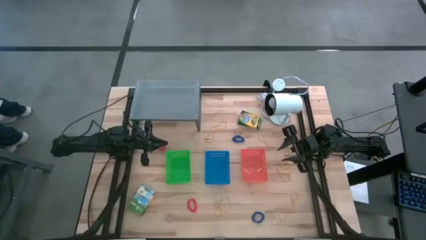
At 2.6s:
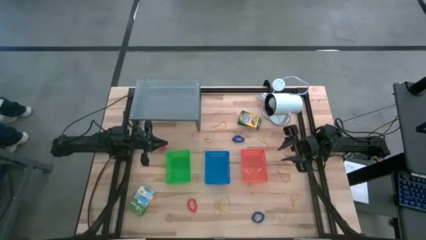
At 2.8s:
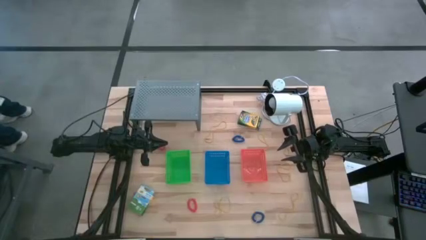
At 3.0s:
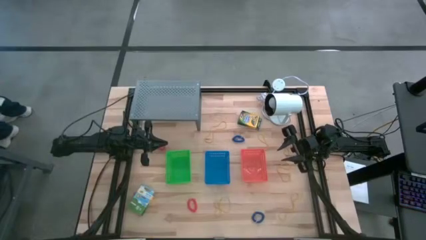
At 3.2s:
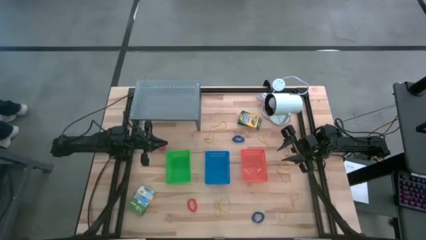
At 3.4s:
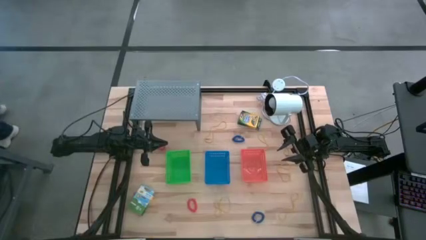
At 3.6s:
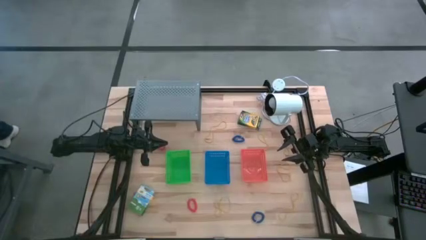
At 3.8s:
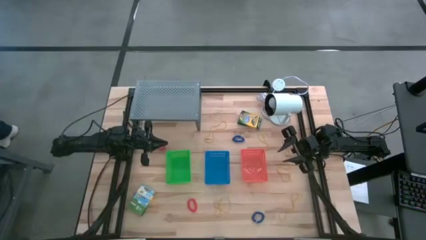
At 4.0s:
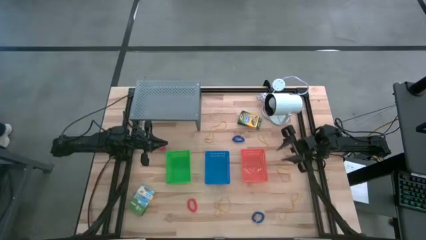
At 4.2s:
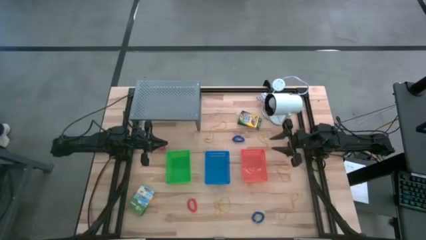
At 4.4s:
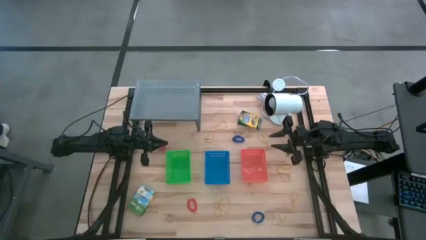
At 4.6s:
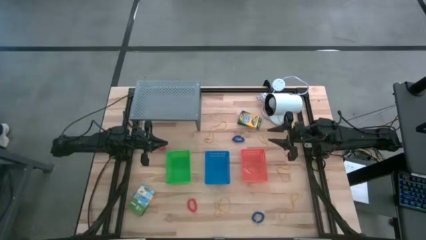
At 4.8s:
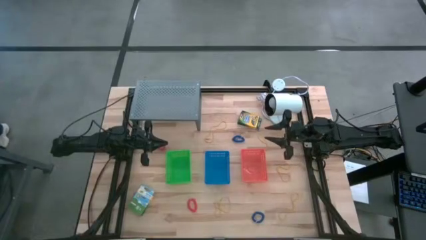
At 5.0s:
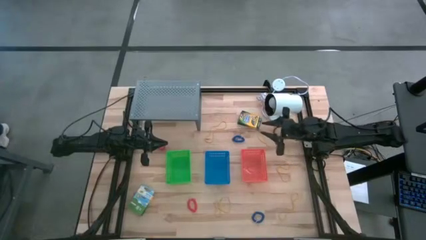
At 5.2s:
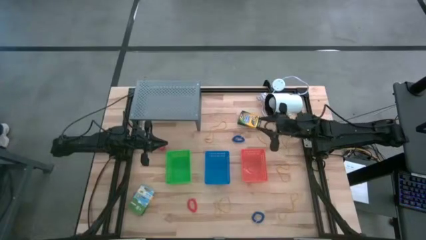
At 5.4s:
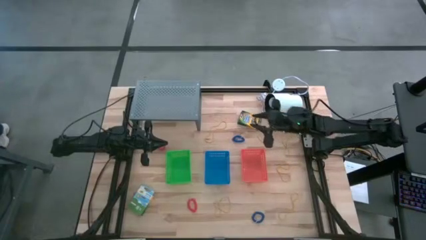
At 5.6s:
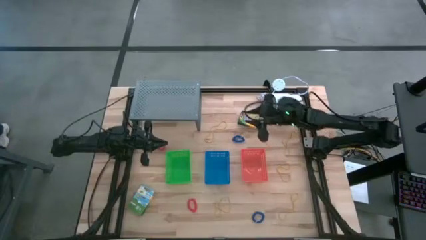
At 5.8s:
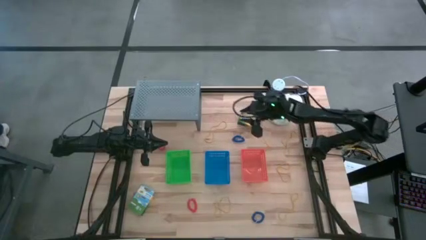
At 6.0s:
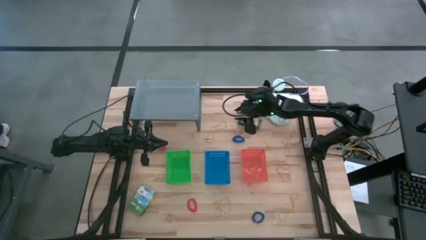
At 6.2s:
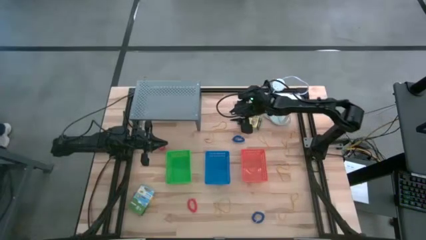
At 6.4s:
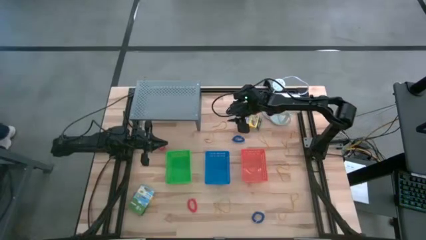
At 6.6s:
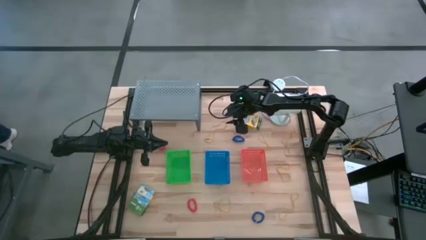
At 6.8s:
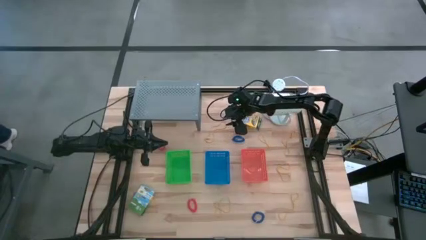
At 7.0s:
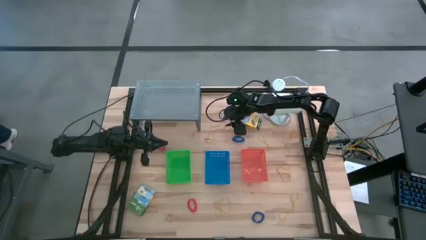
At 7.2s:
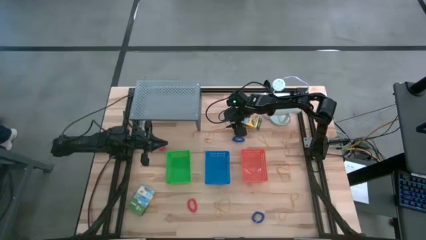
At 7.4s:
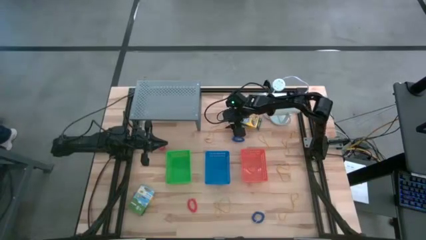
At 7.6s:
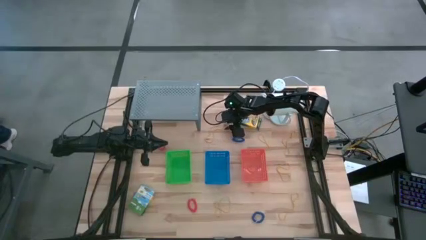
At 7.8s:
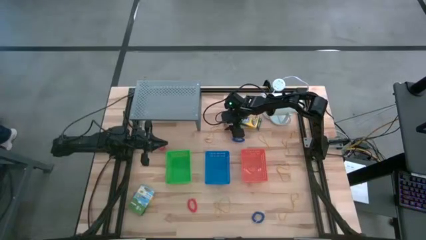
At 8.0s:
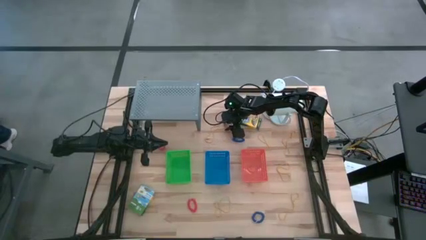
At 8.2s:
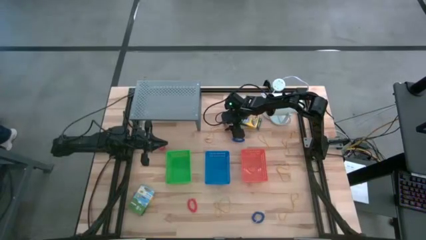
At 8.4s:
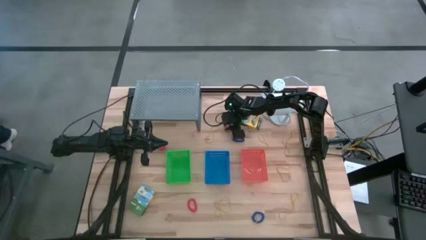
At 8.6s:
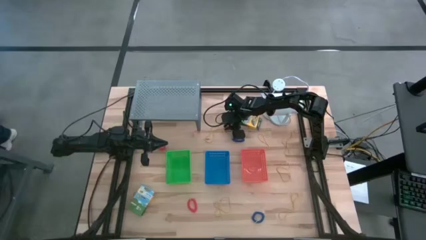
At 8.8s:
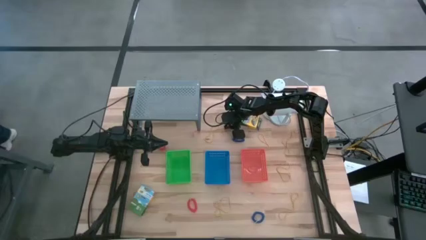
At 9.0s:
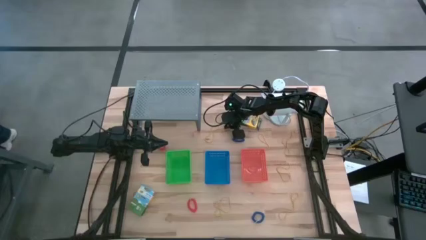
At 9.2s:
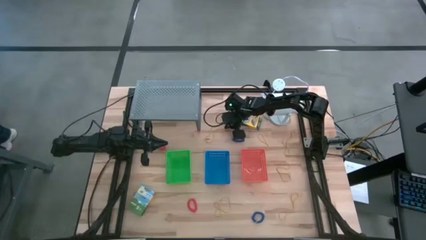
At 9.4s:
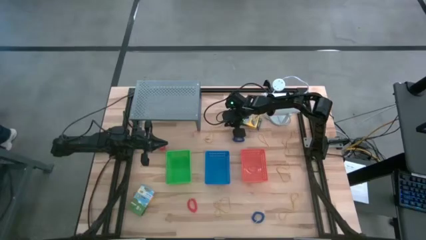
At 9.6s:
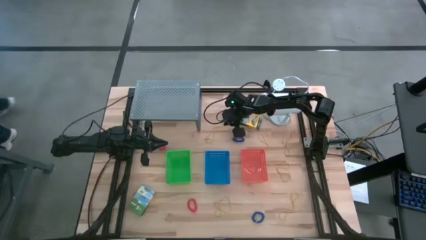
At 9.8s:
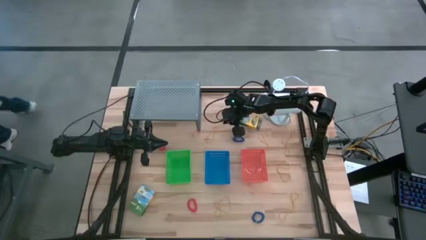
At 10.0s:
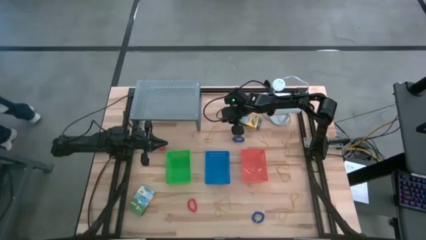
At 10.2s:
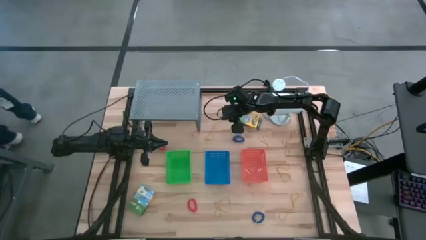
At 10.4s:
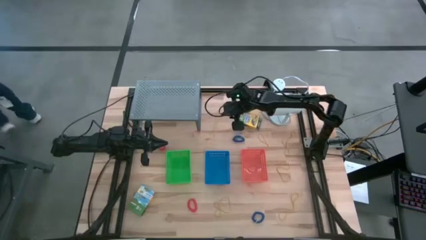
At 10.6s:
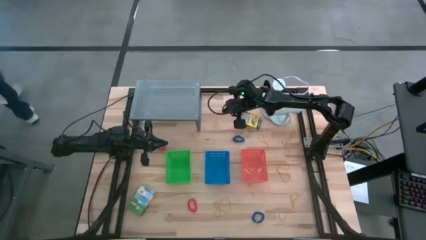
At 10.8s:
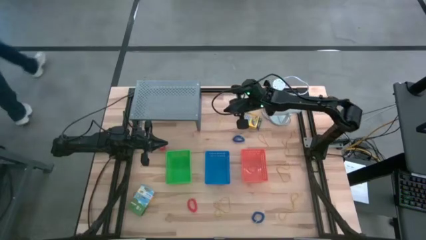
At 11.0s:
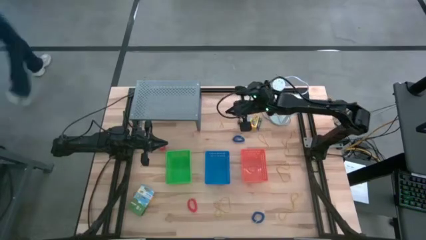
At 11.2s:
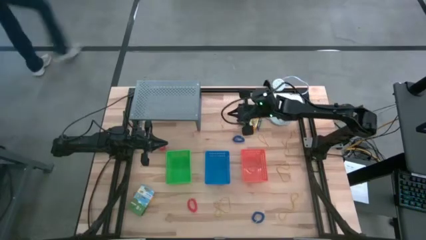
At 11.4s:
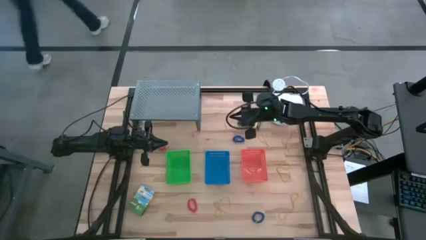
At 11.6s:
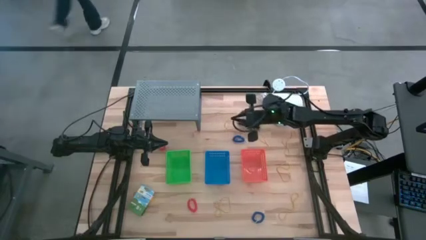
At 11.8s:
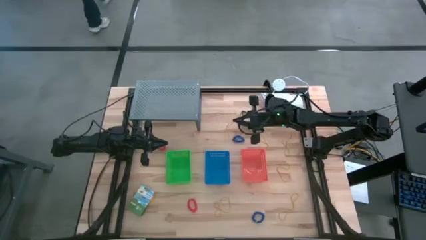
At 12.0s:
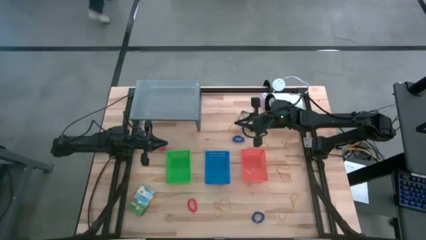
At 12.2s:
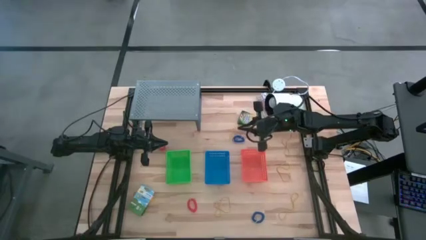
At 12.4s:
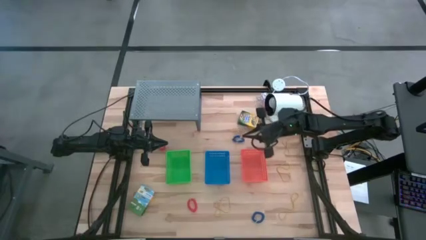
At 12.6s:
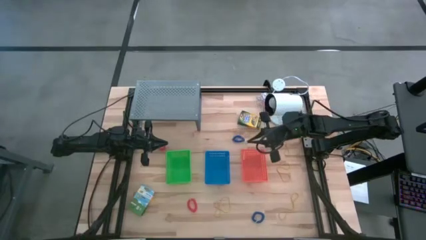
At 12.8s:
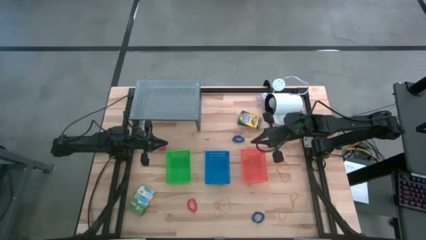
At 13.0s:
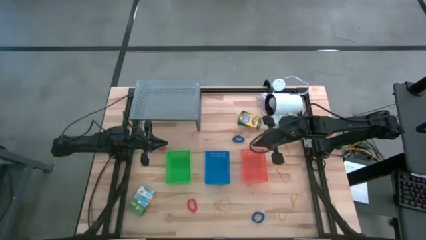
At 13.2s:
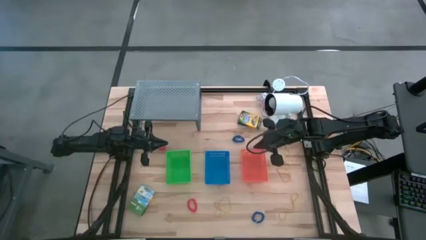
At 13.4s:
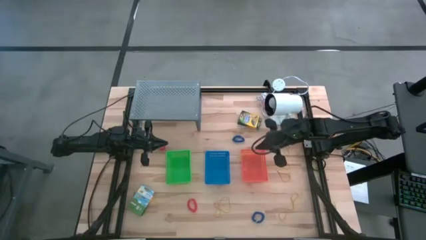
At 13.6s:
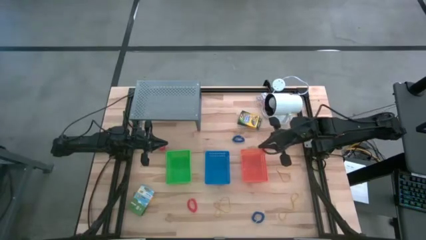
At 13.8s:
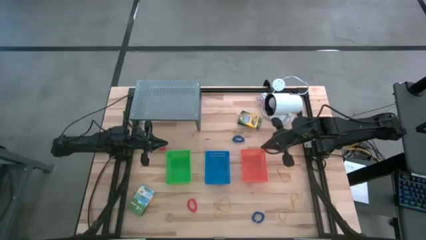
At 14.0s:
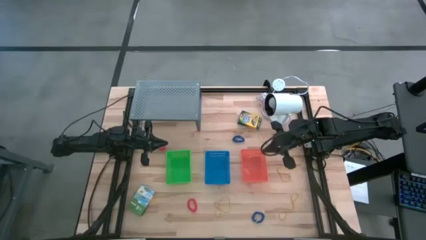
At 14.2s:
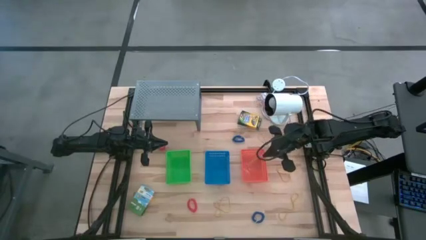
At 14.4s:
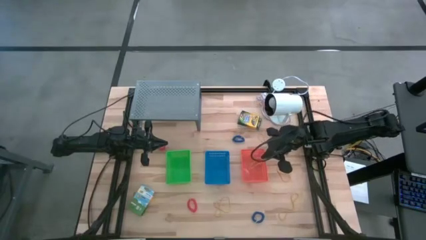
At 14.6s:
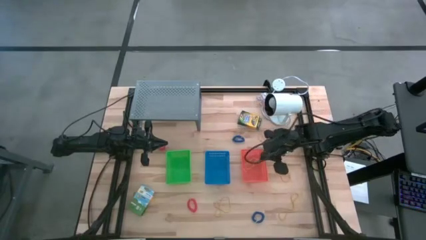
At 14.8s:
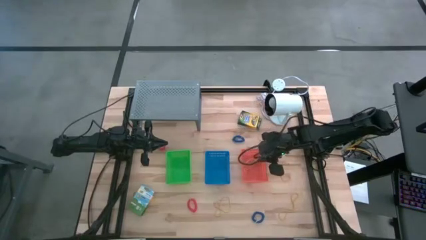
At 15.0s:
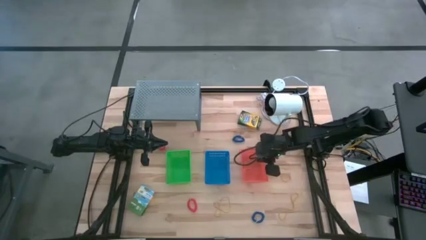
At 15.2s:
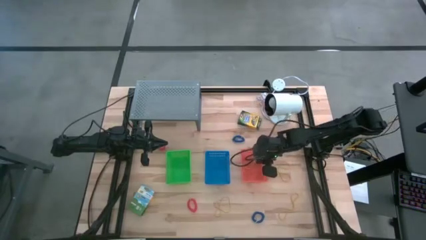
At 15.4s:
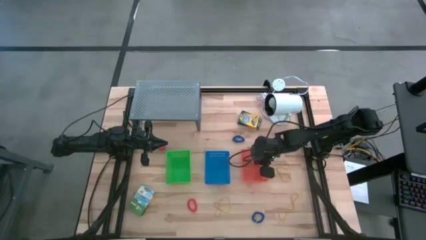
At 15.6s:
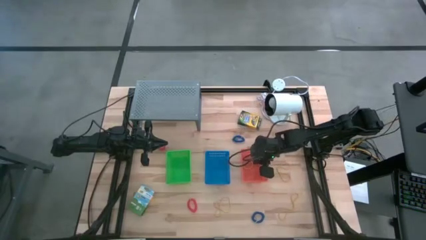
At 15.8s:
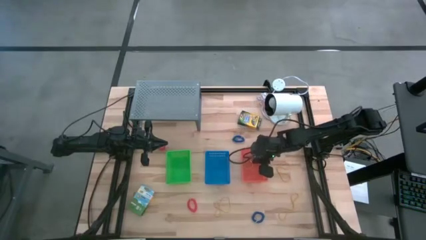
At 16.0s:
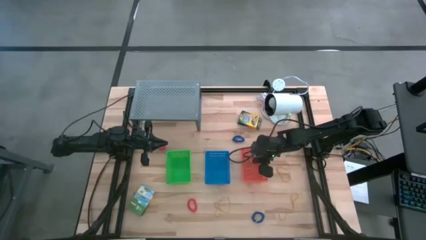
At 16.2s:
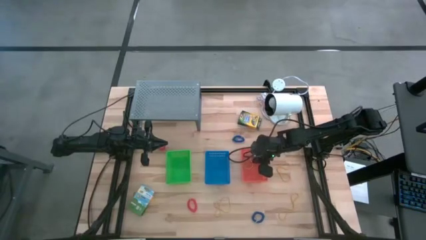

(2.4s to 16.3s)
Task: Pick & Place Office Desk Supplies
Put the yellow rubber band into the orange bin
